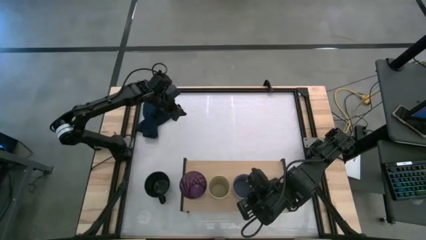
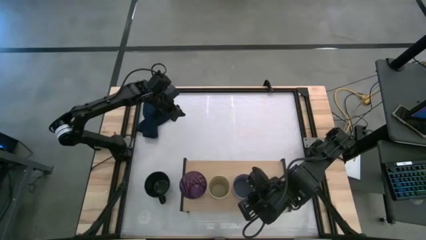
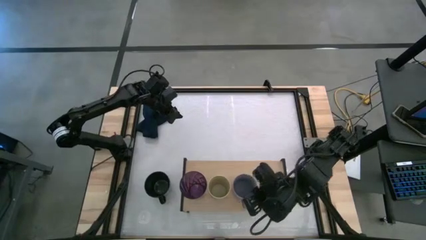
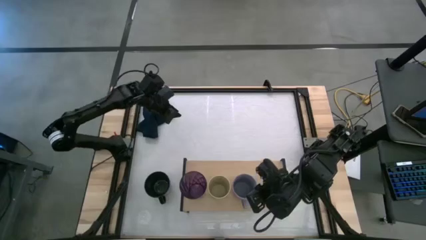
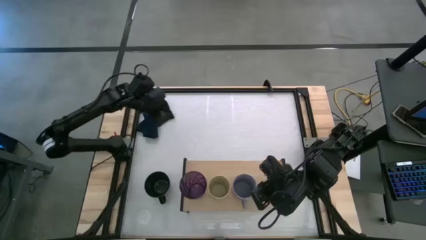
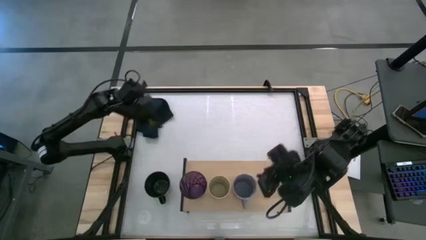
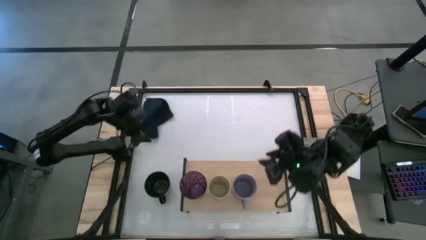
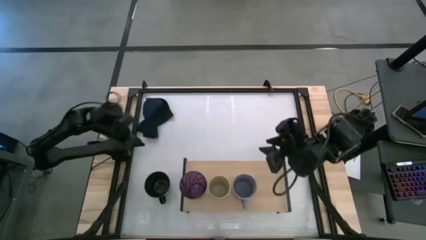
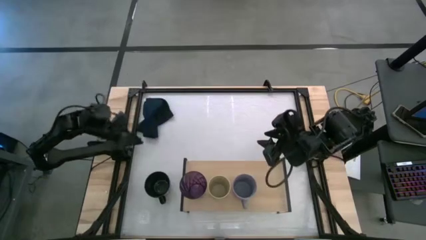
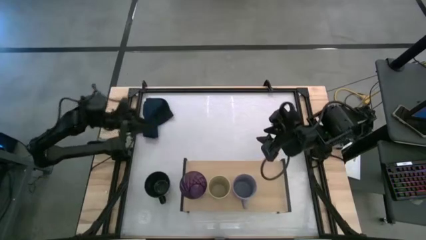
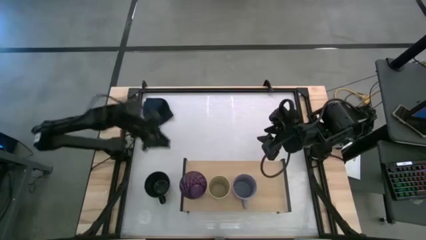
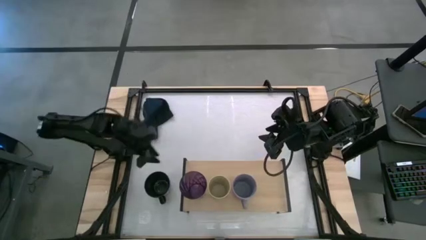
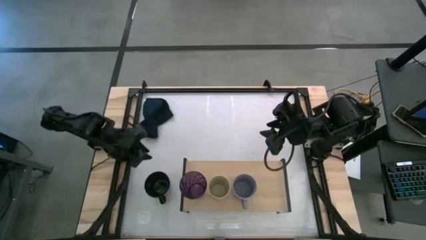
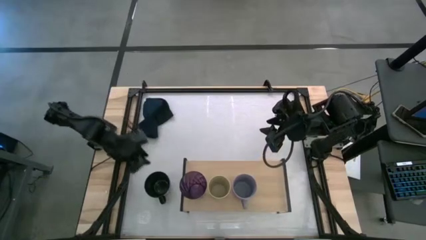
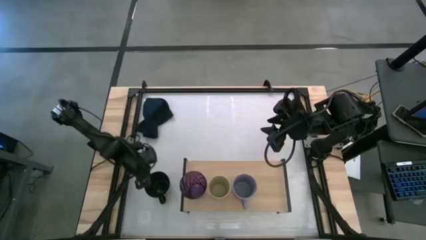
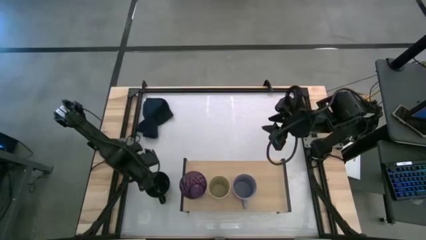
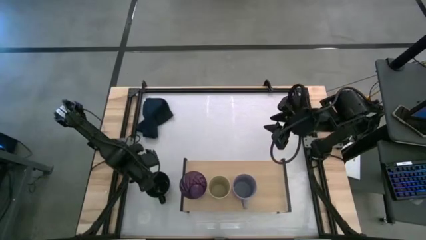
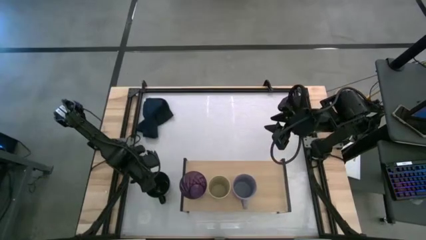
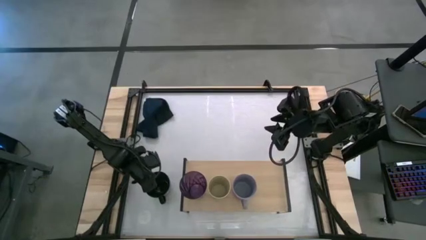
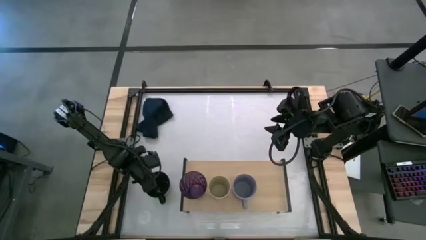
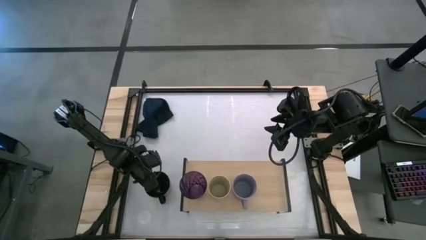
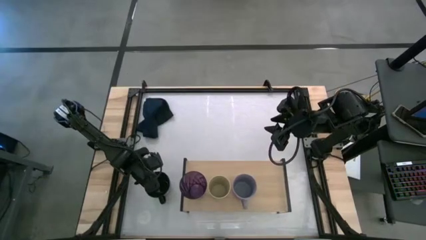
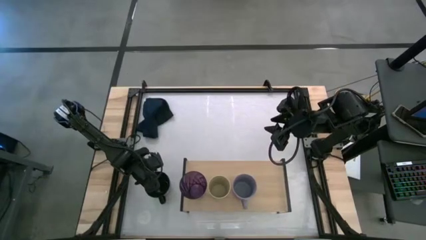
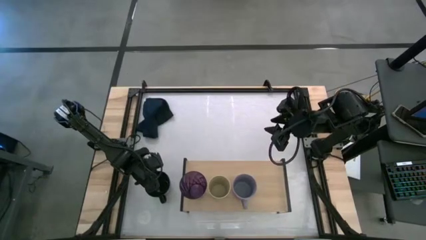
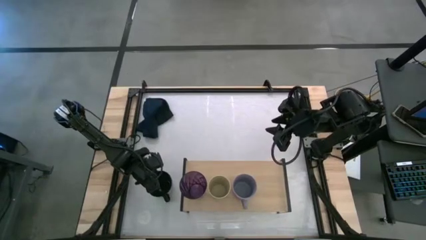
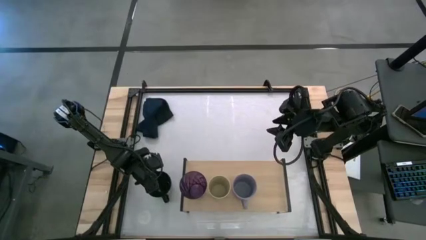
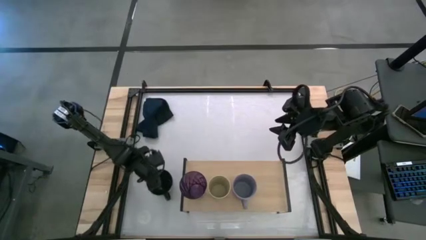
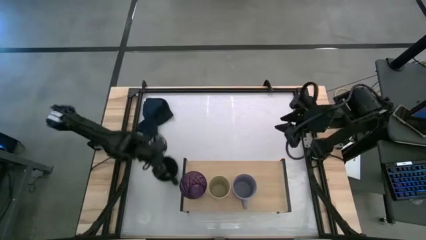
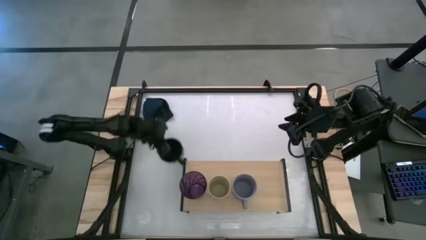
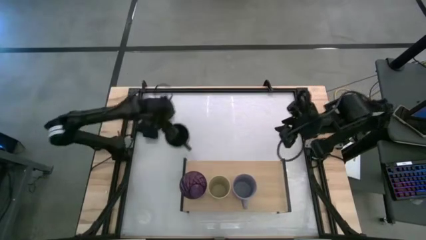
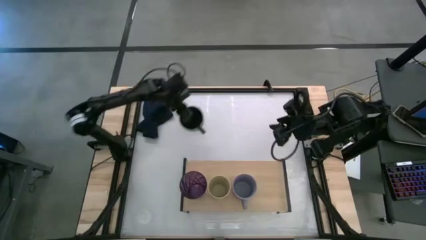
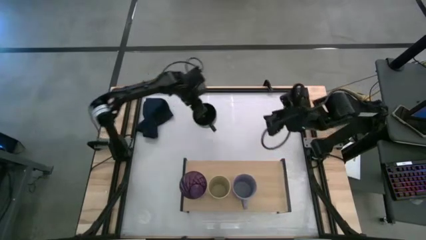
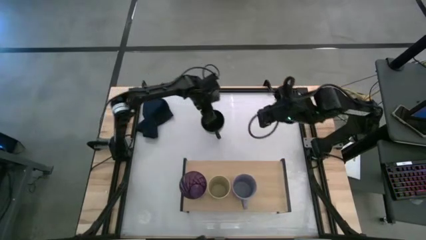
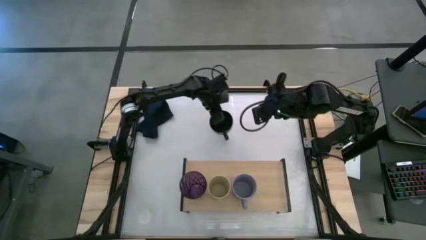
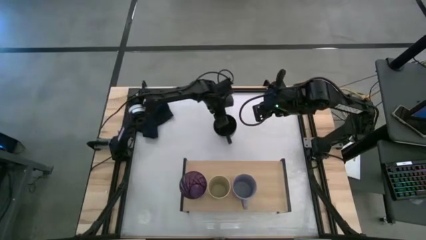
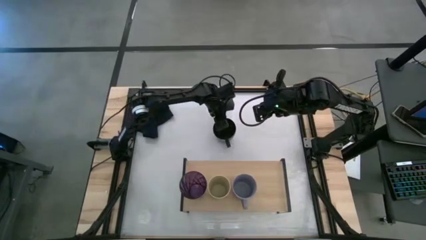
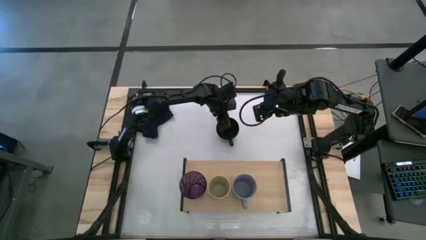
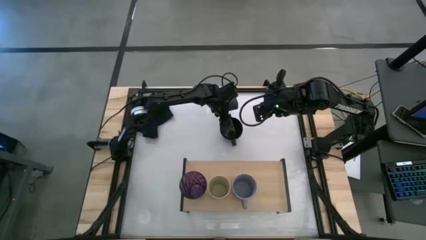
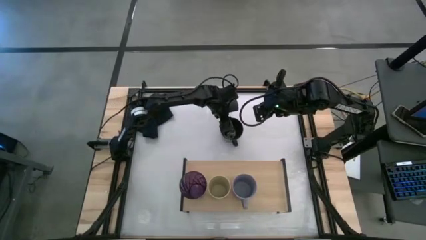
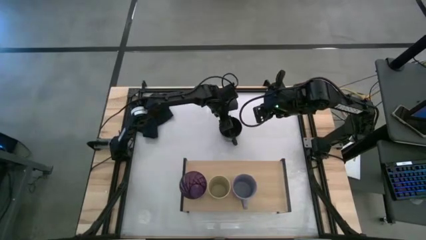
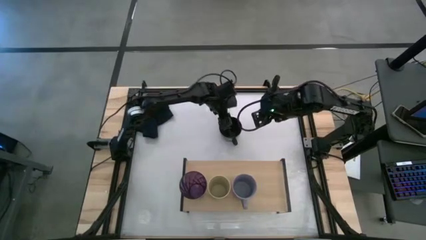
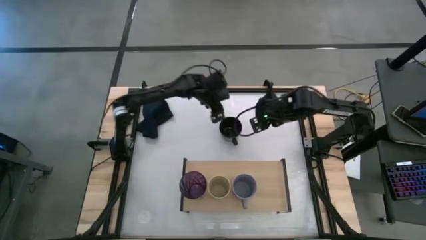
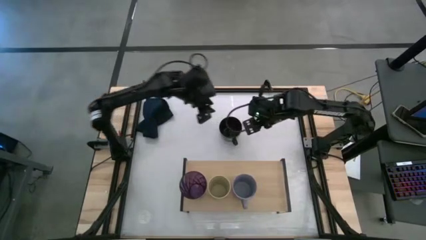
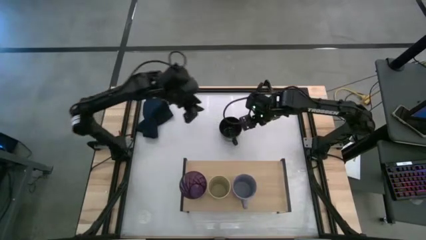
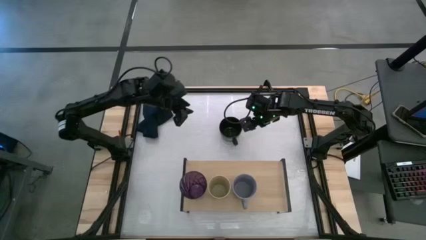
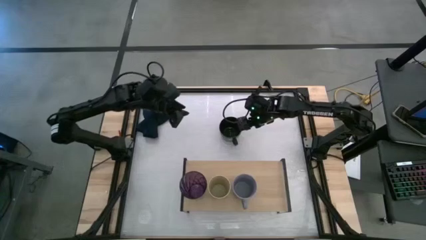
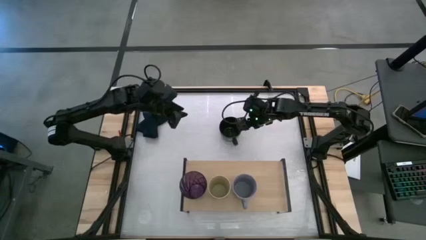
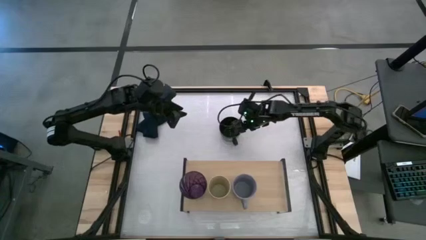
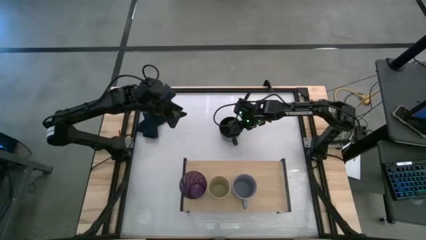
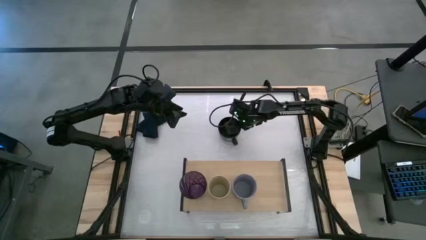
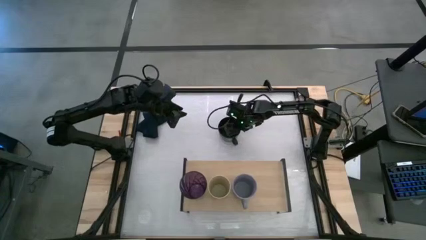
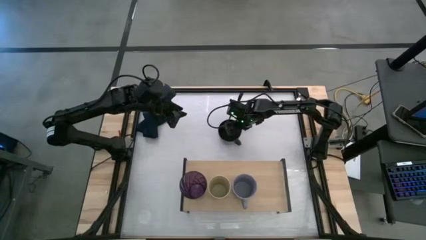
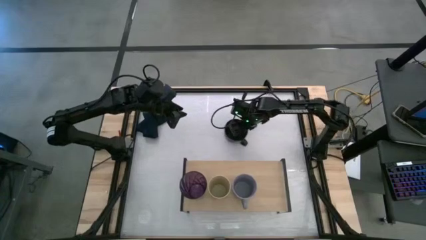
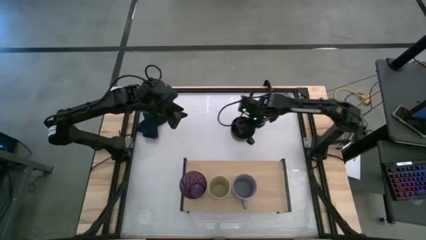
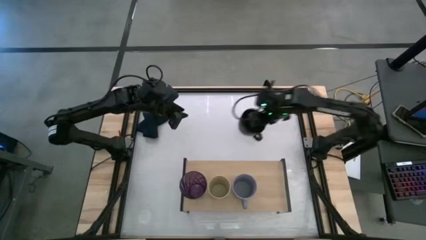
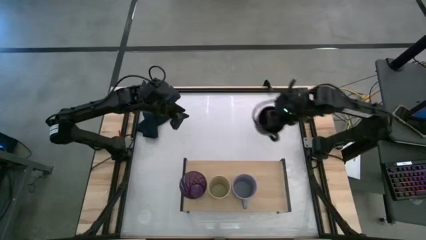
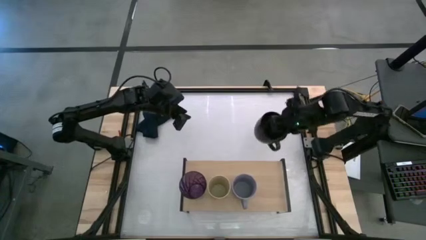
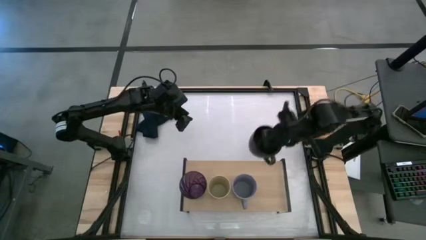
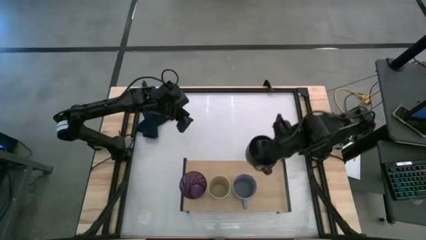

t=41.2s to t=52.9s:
Task: Stack small to large cups/mugs on shelf
Put the black mug on the shelf
